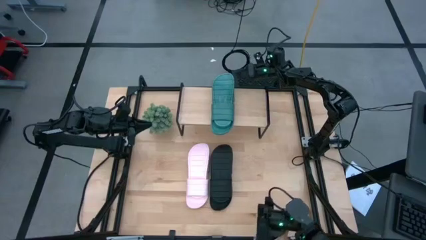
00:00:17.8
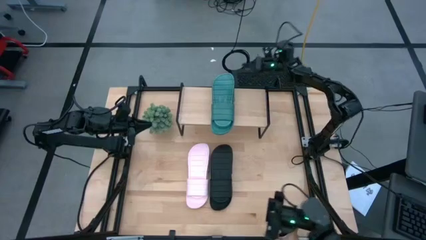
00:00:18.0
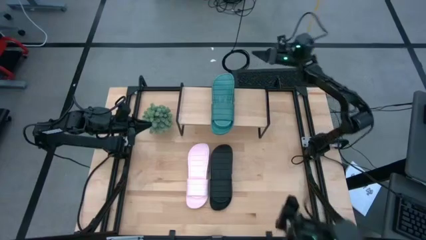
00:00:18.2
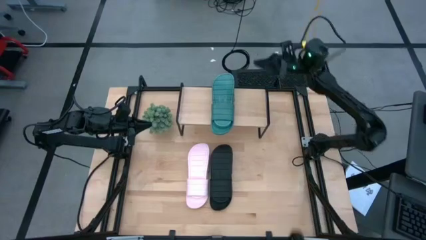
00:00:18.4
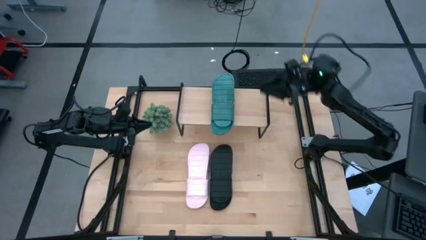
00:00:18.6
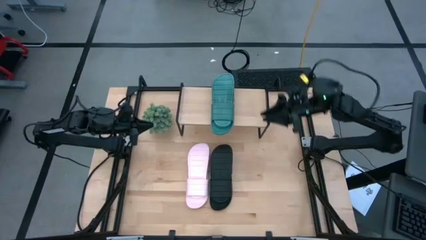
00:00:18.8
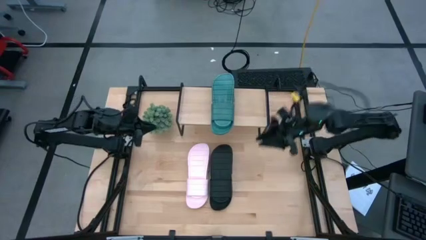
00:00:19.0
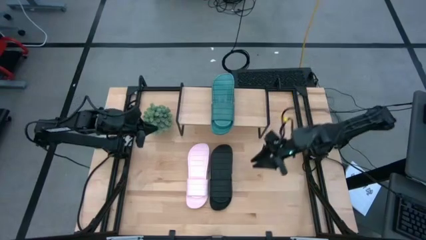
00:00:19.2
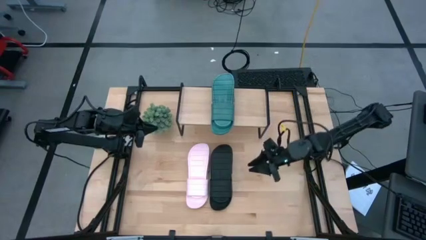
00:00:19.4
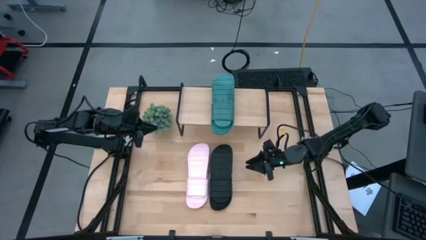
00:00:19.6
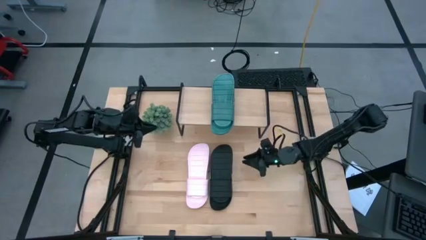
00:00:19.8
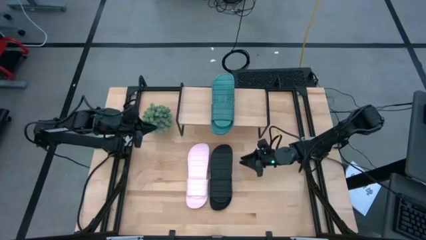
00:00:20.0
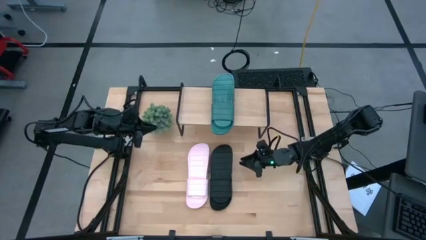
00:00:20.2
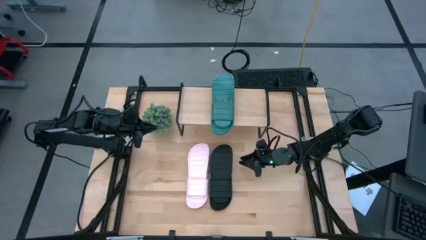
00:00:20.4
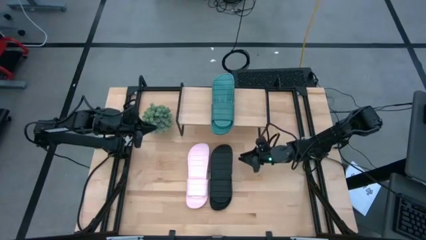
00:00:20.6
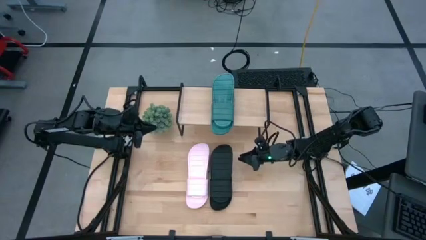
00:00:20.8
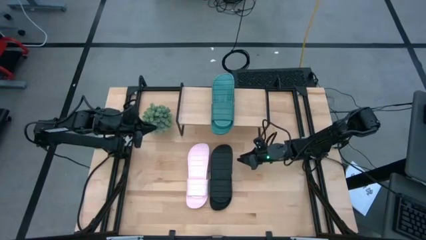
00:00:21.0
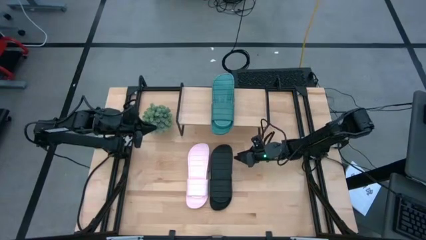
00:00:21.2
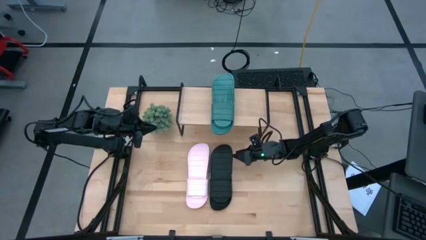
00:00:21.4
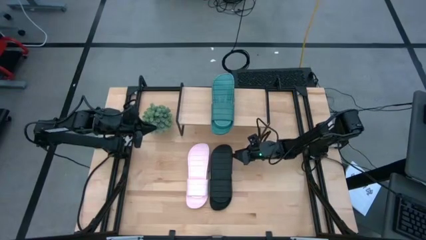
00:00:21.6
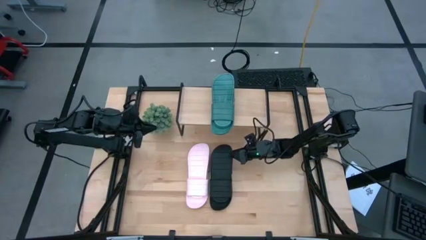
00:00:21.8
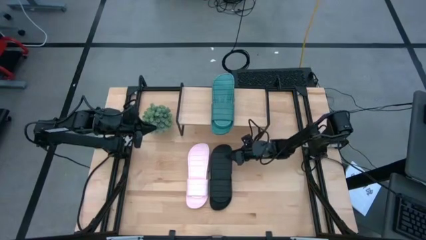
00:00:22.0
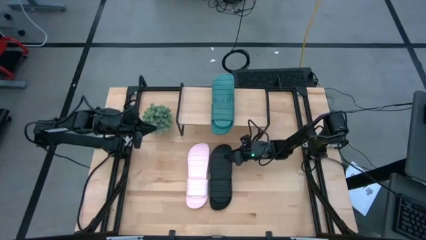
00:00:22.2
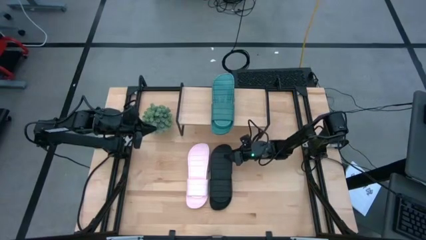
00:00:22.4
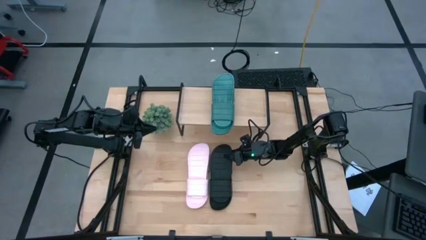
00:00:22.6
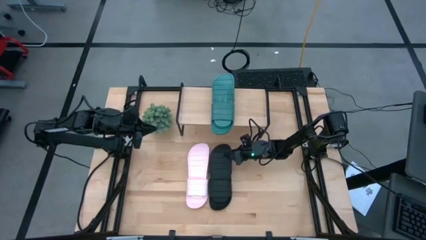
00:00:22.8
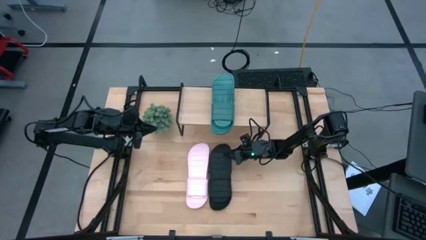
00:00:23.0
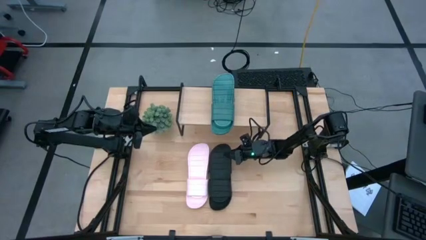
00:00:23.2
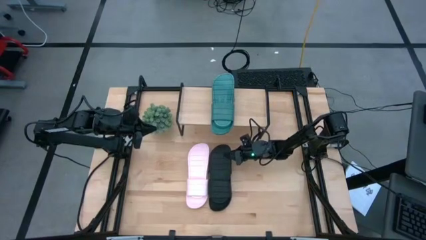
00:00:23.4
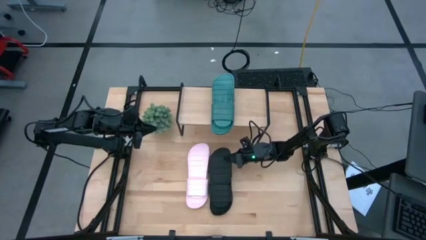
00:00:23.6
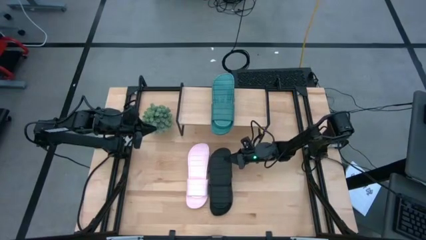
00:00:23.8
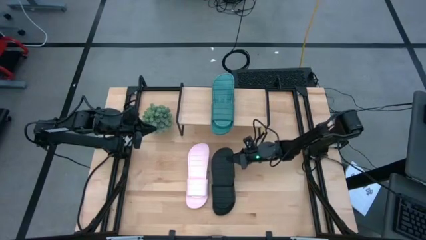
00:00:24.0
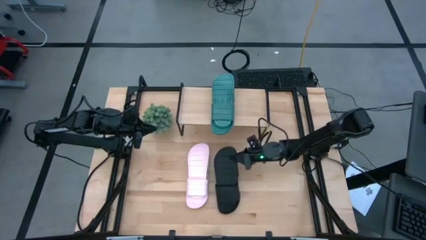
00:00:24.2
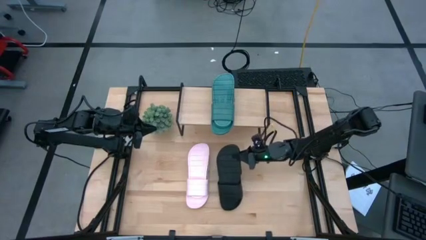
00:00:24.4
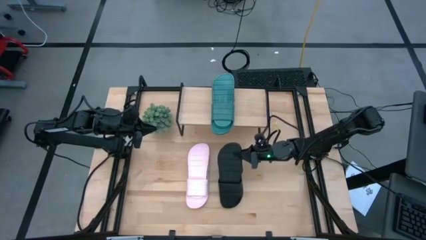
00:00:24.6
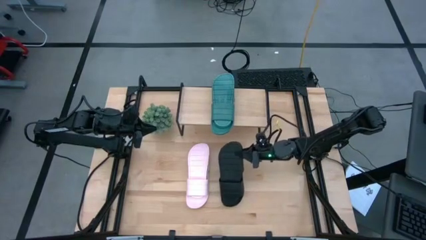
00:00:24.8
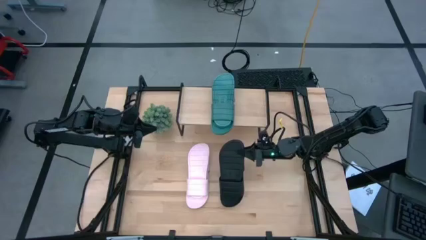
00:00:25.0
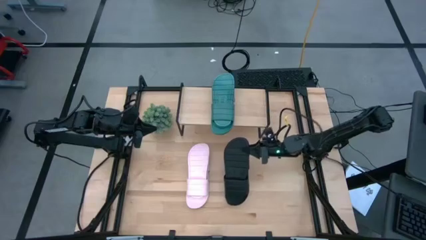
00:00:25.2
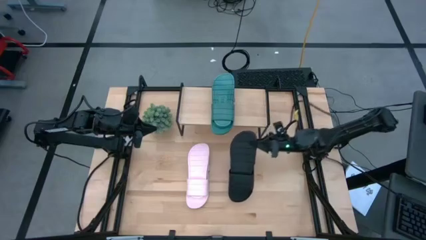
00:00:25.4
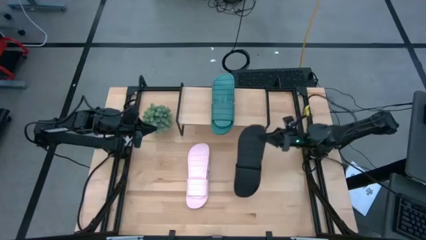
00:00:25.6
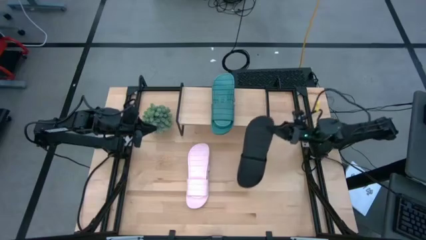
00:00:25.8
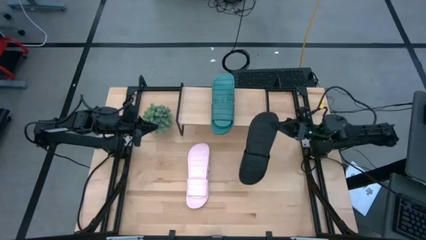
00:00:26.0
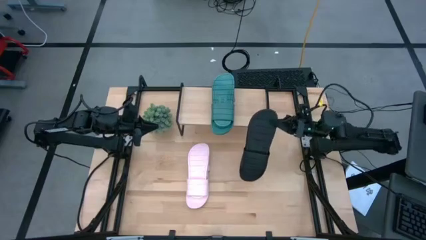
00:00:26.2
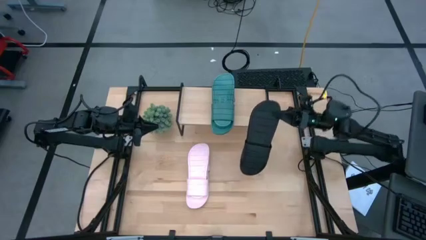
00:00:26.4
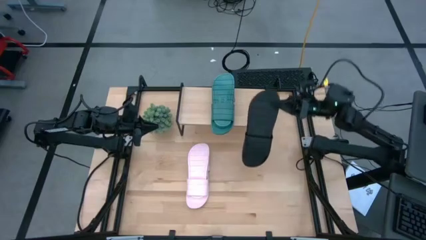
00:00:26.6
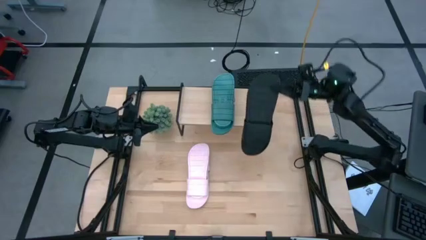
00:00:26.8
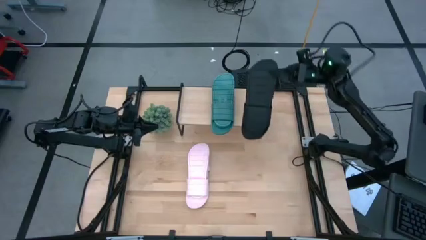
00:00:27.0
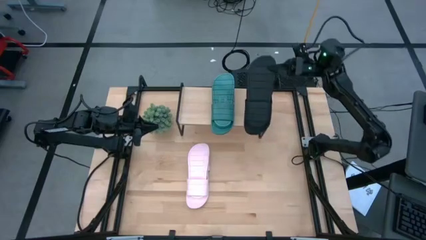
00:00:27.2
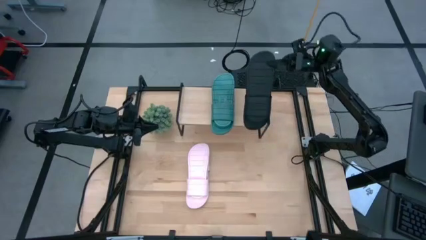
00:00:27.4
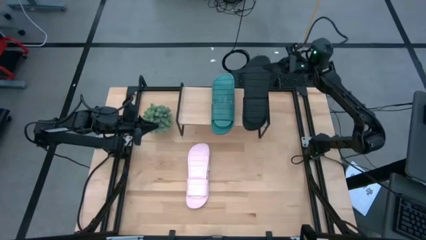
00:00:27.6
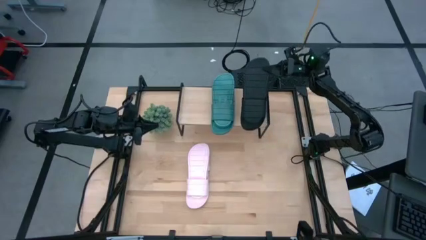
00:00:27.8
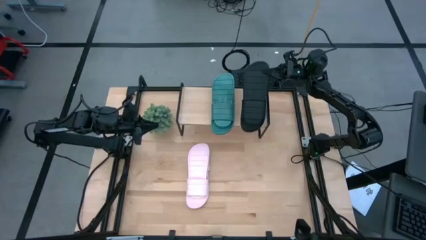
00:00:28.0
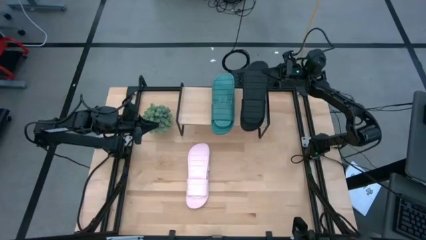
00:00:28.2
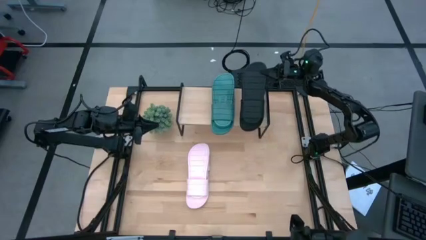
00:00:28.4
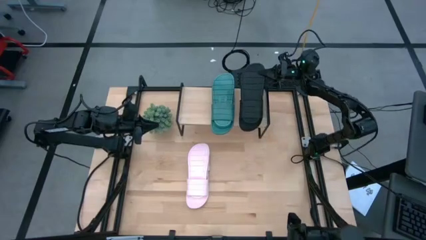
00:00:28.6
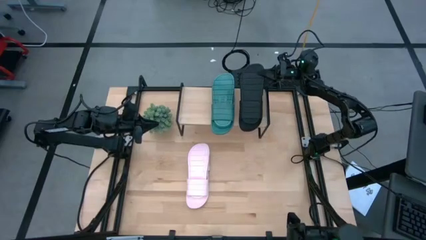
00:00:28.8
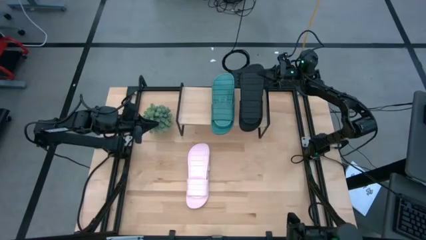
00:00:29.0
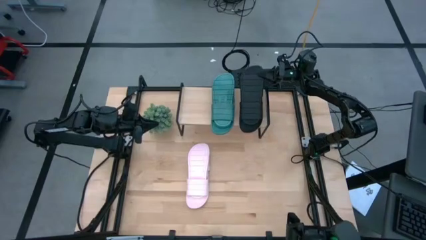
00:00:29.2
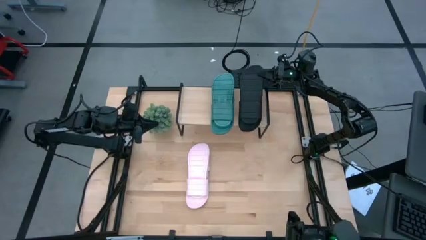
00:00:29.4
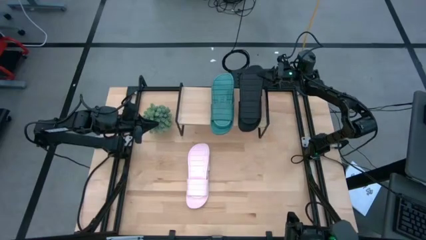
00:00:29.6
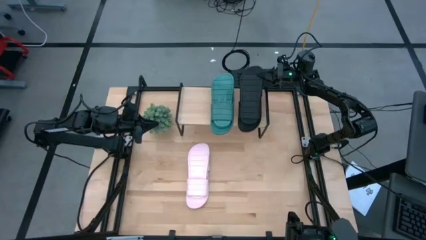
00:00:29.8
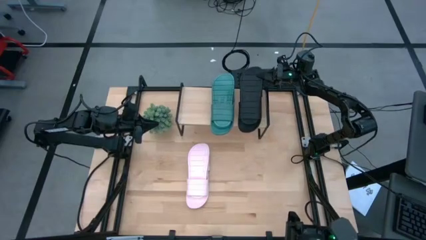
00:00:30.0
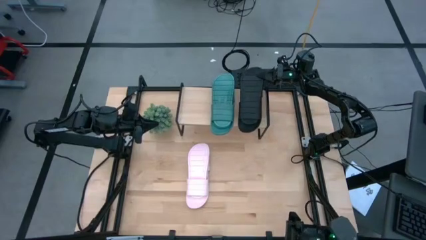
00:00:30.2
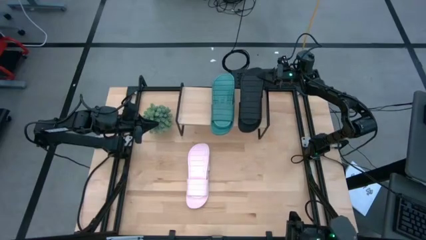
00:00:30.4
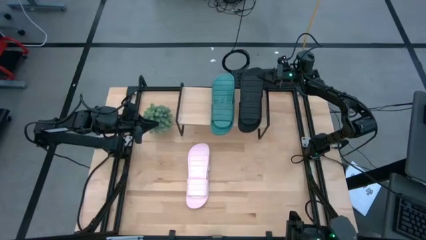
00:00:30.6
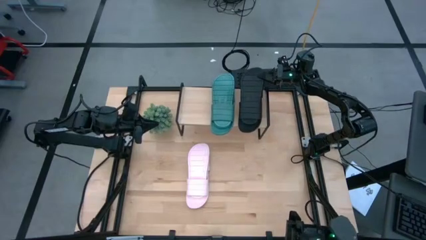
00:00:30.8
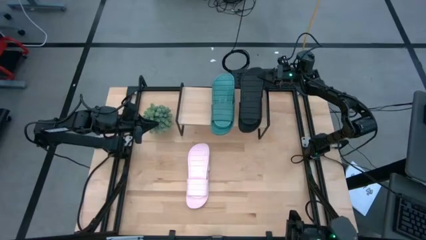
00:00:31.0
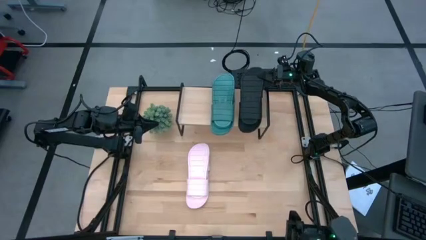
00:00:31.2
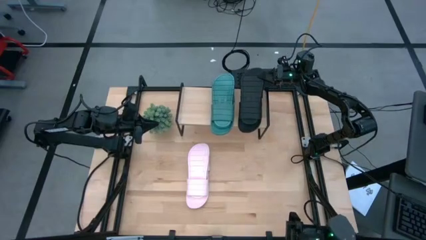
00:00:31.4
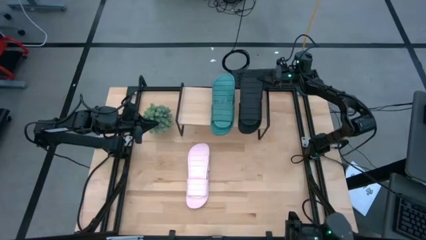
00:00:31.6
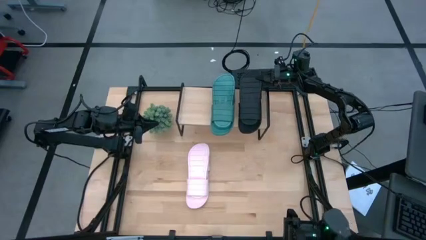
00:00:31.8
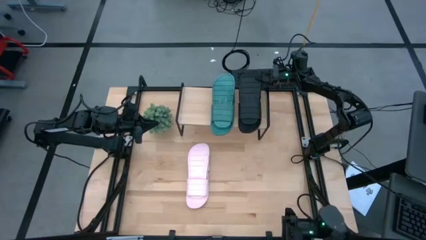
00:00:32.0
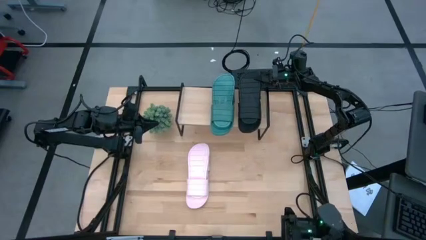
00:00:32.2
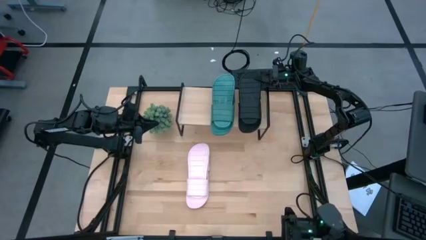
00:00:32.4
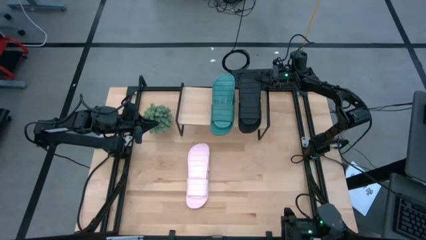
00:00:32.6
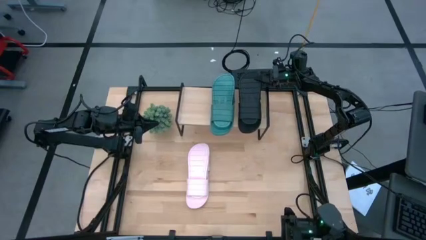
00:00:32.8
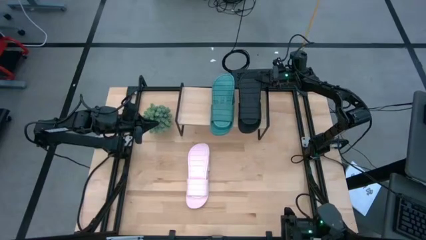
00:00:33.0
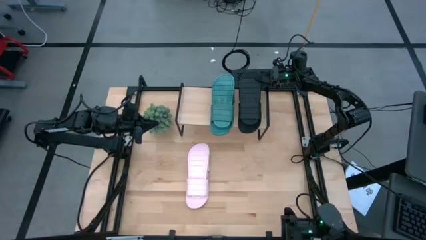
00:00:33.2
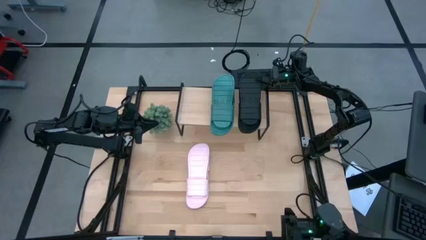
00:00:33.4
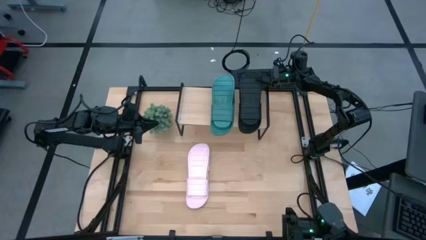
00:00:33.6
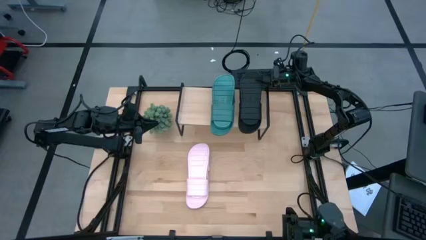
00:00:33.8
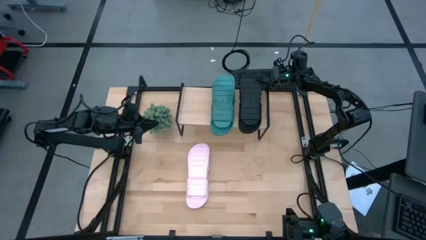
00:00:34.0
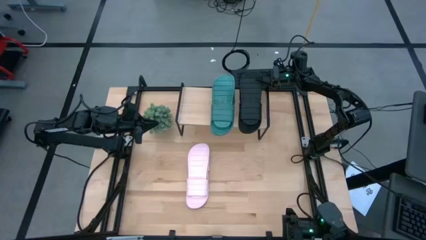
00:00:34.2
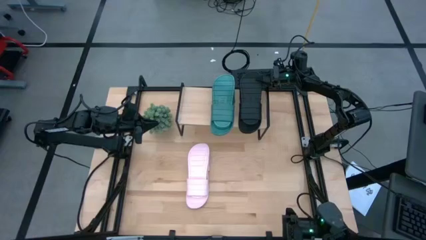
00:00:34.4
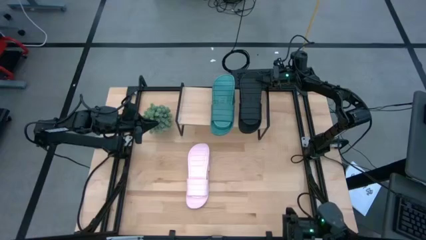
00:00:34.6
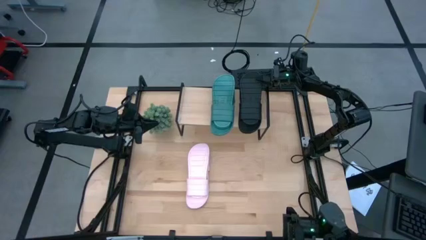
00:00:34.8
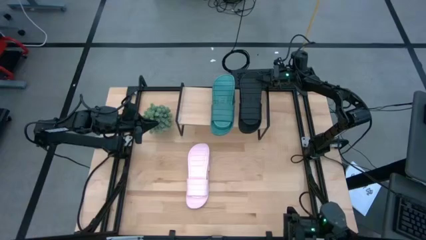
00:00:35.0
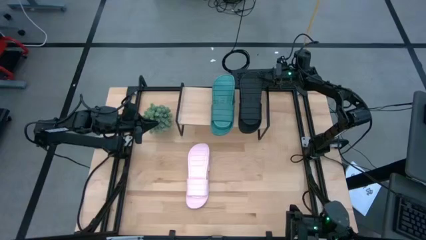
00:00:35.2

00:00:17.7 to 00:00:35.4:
Task: Pick and place slides into the shelf
Put the pair of black slides on the shelf
